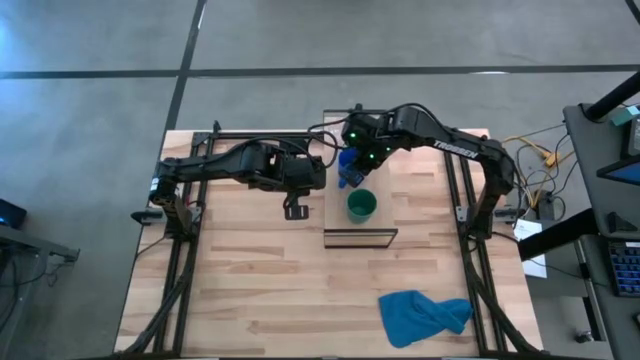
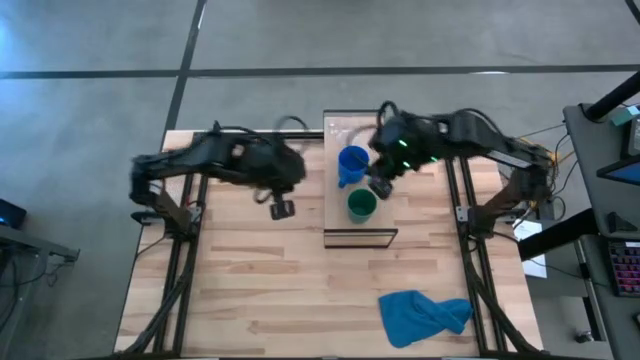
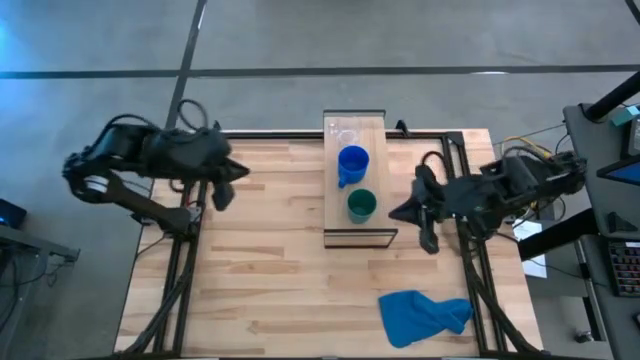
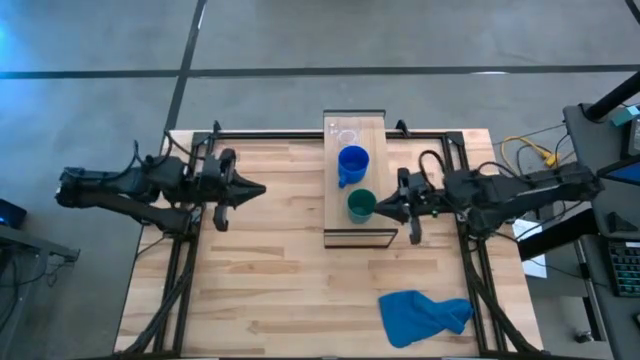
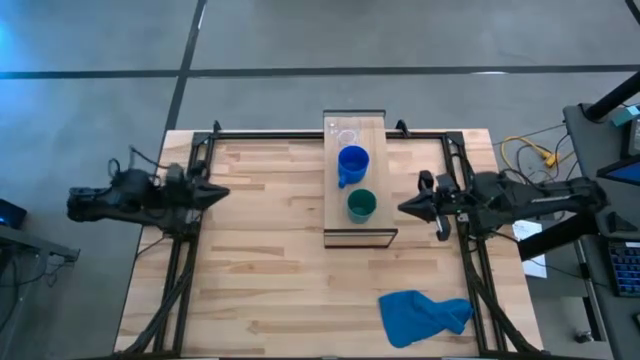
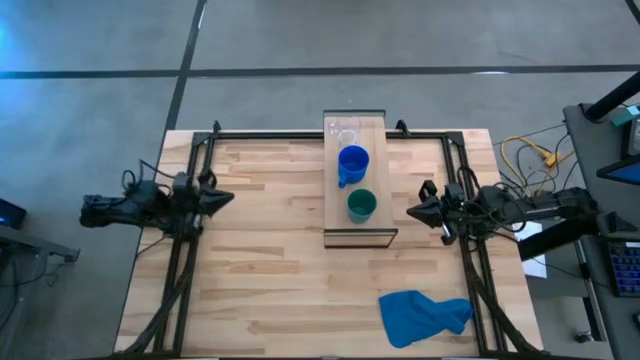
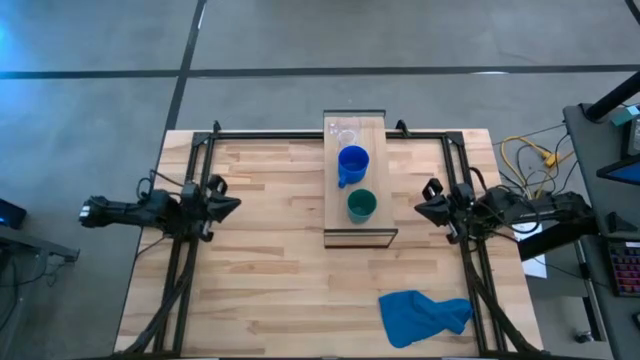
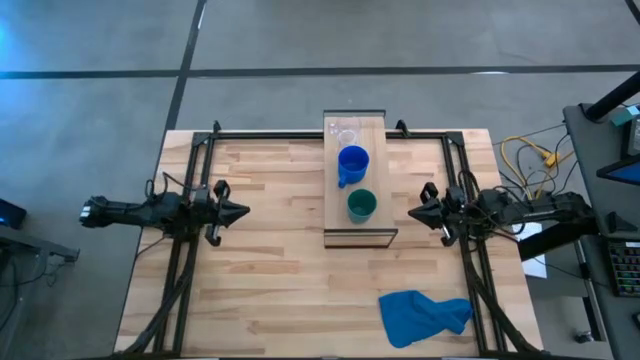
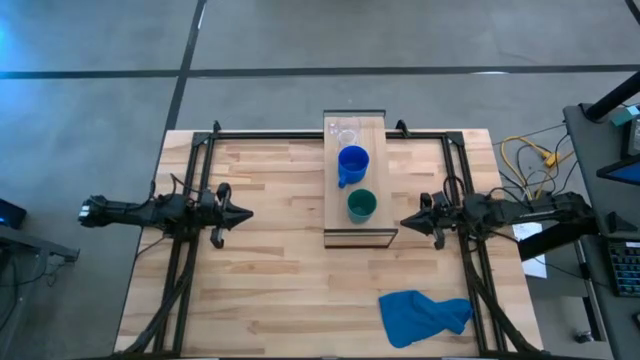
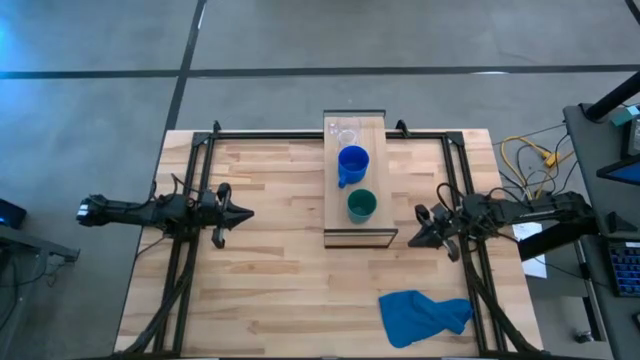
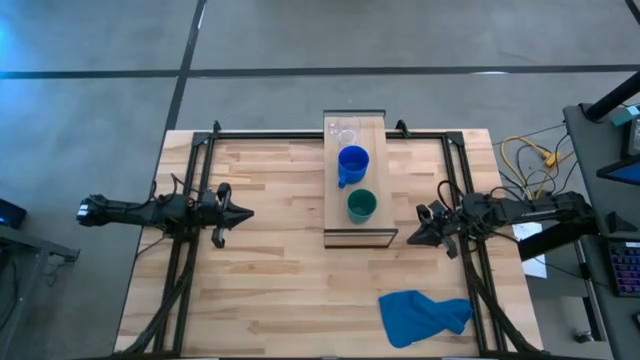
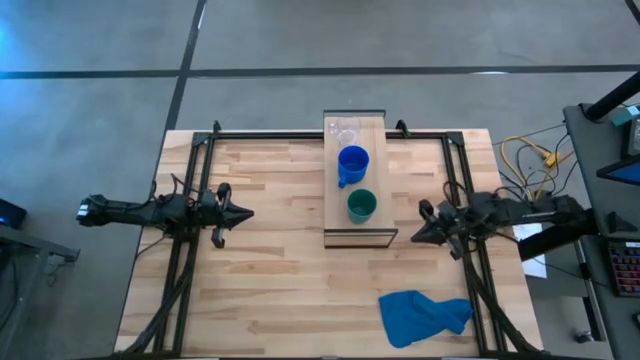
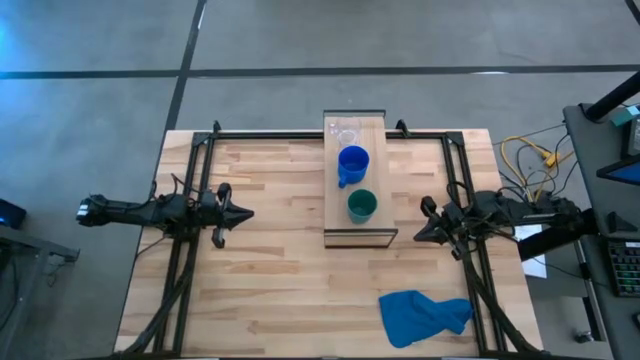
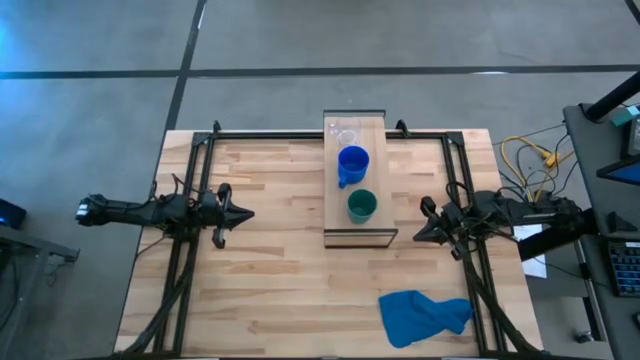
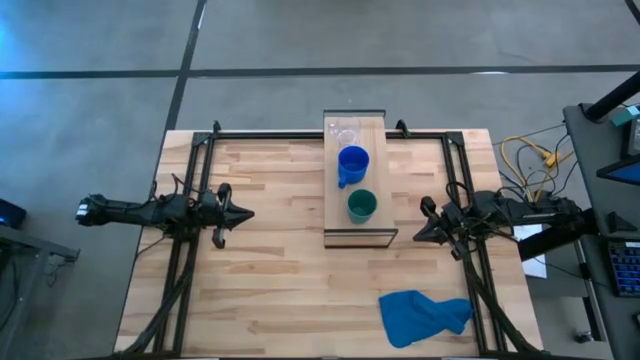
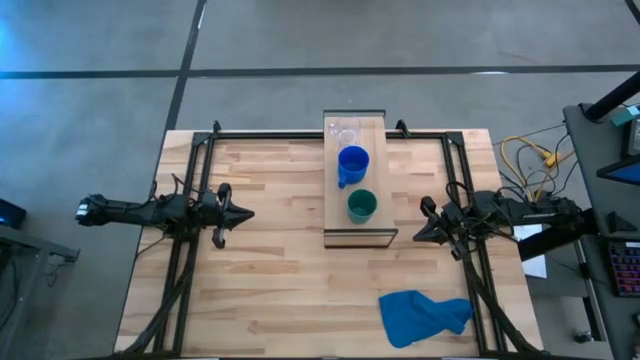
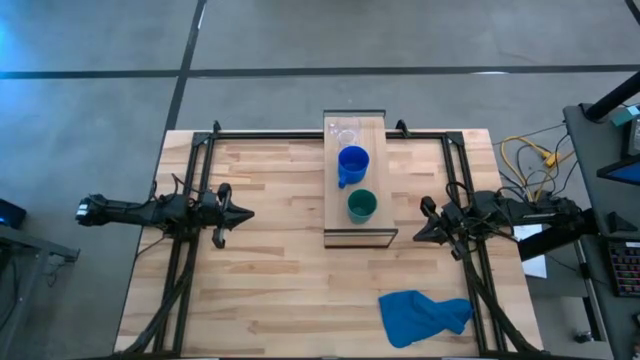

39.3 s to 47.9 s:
Task: Stack small to large cups/mugs on shelf
Return to Home Position

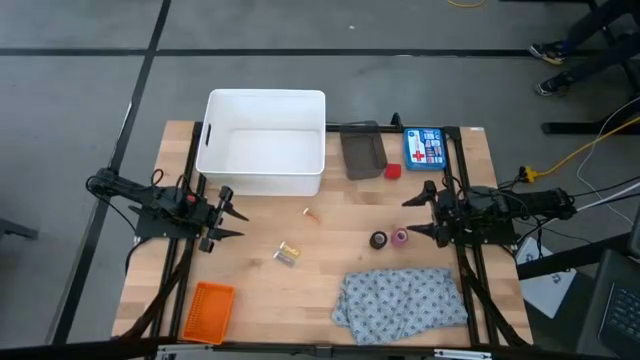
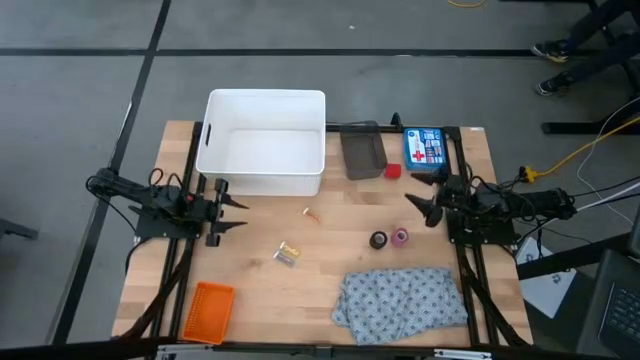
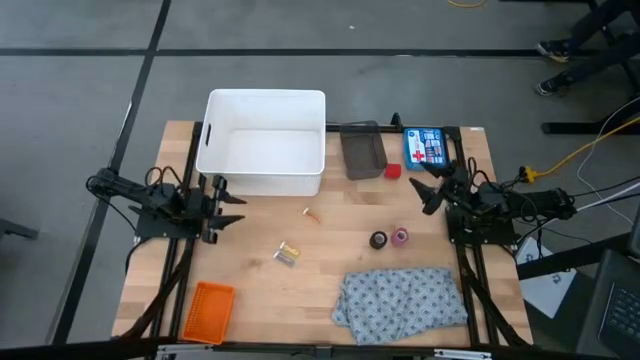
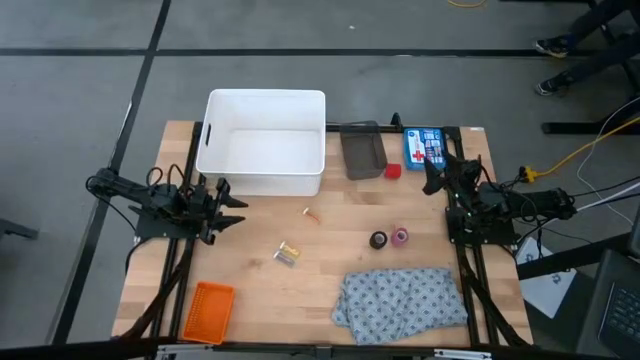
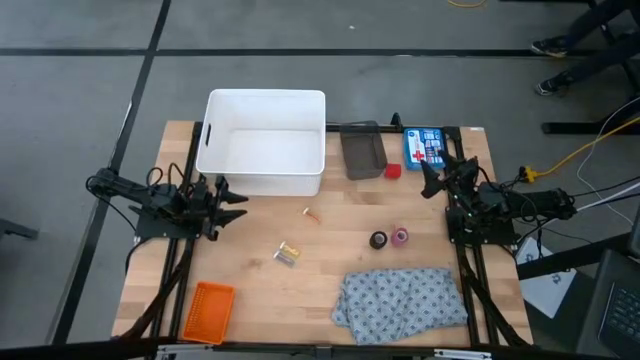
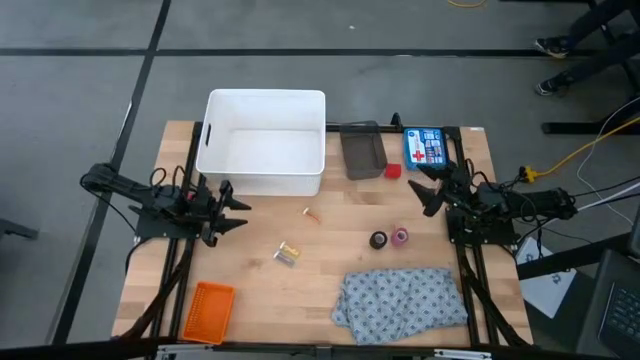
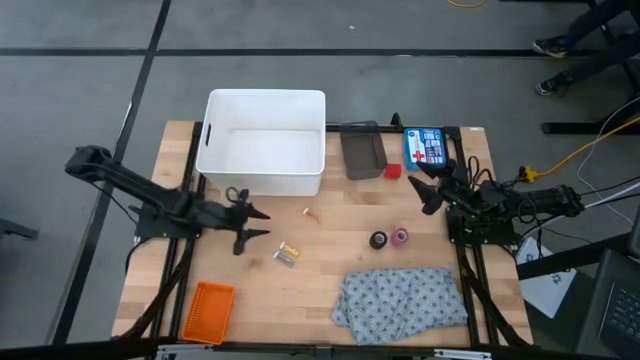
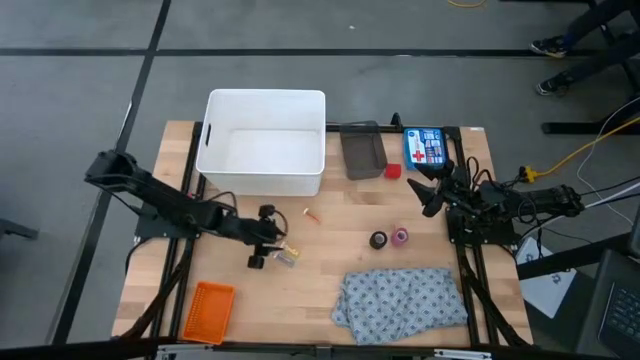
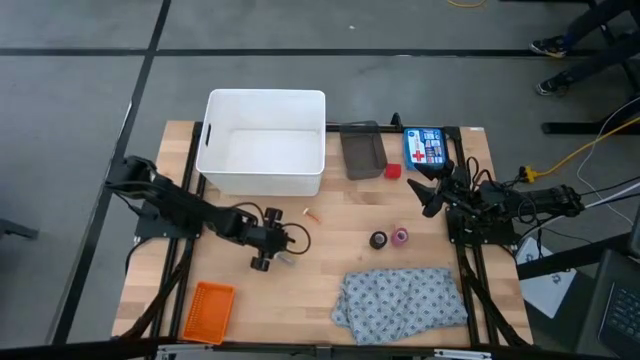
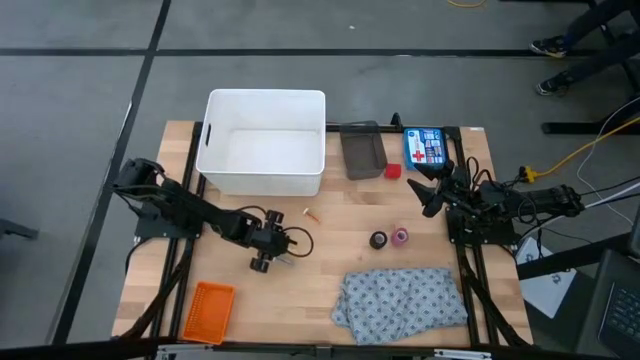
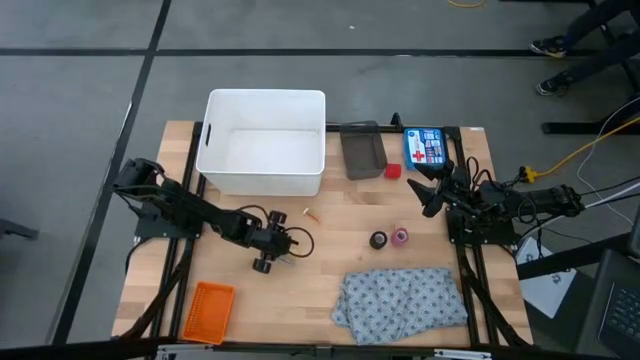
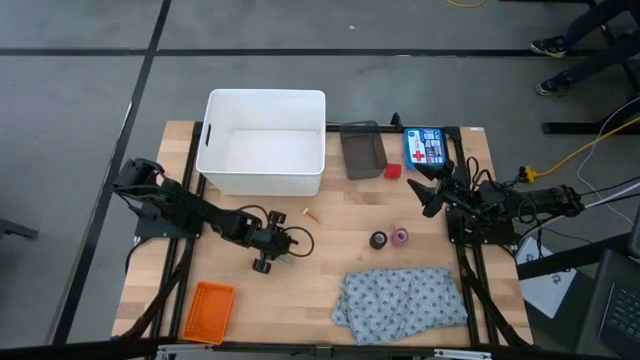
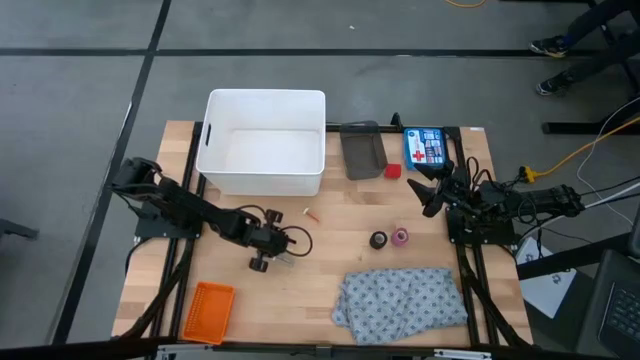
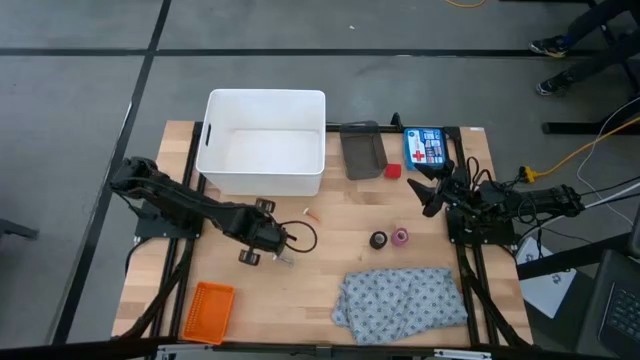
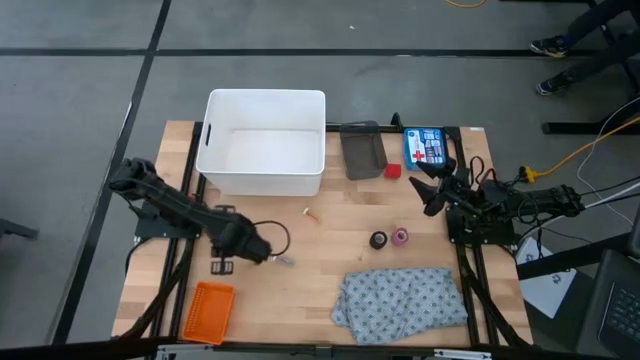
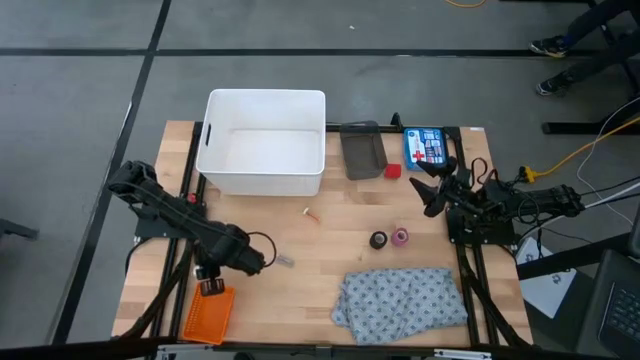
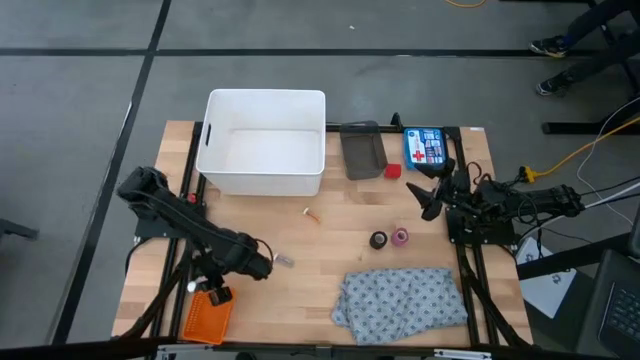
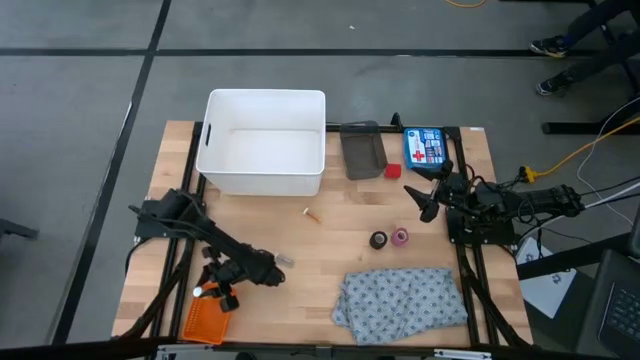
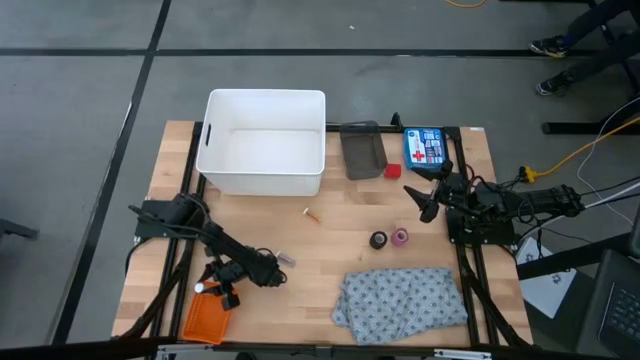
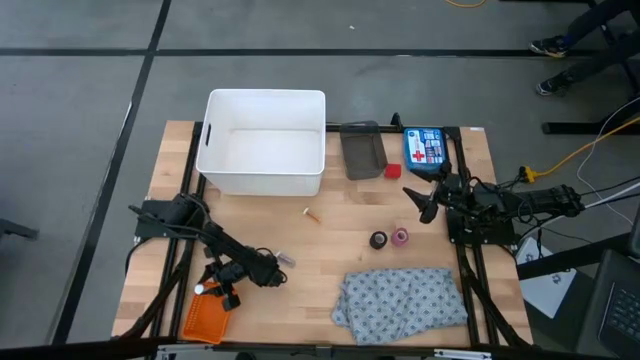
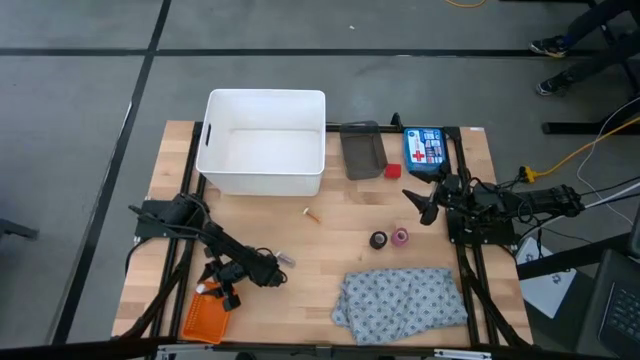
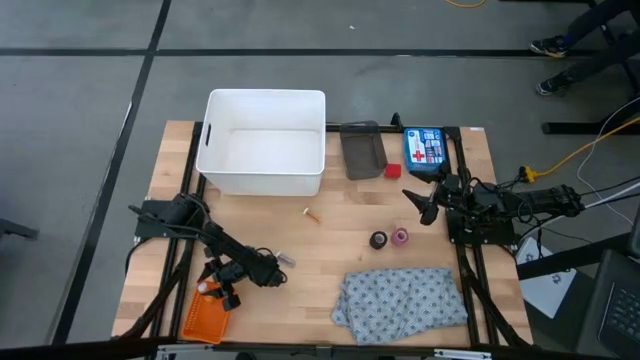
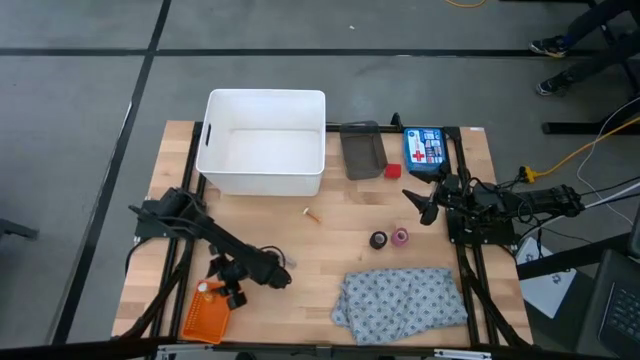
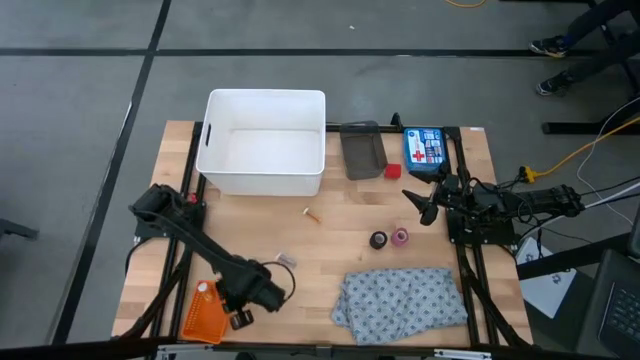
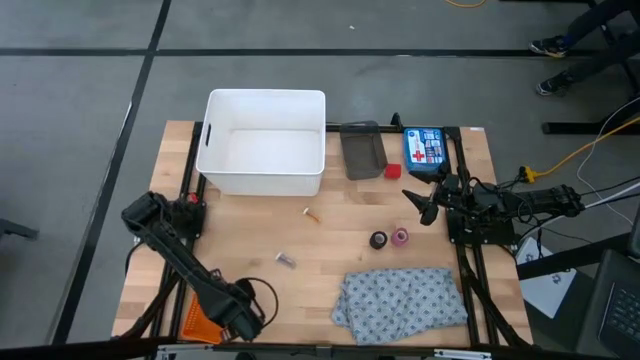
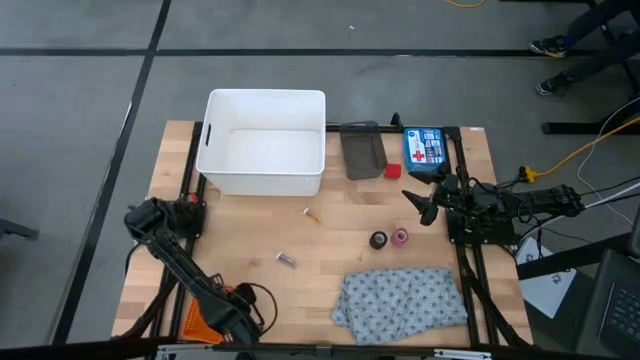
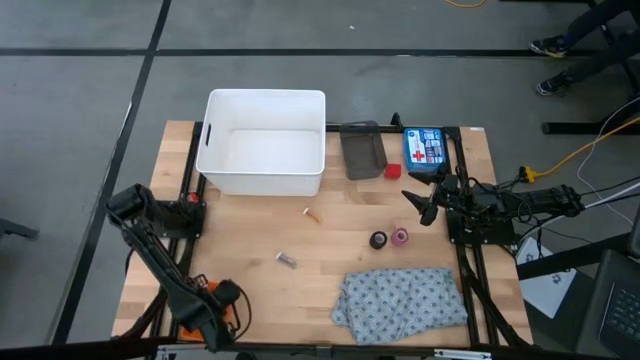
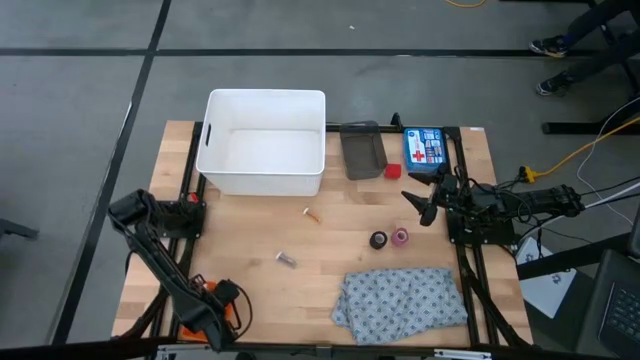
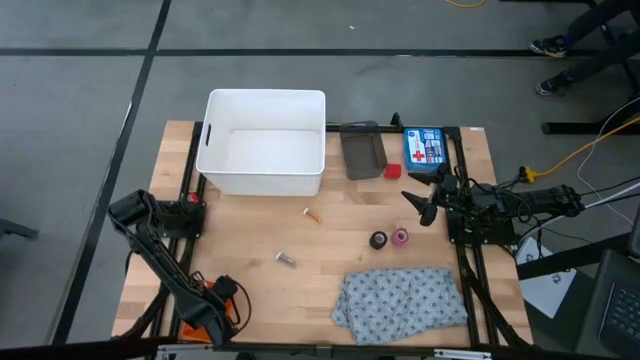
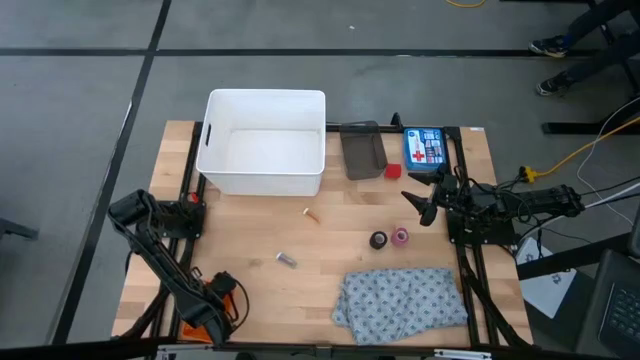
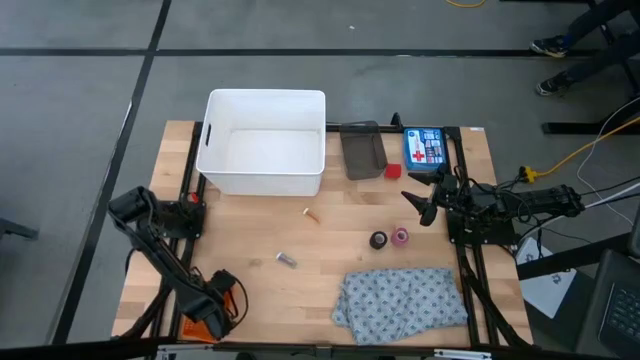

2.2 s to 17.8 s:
Task: Pick & place medical supplies in basket/bin
Put the bottom yellow pill bottle into the orange bin
